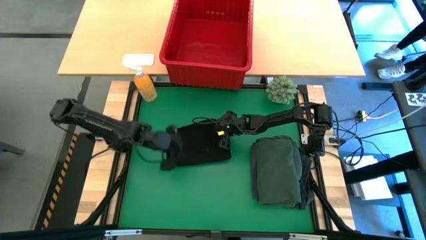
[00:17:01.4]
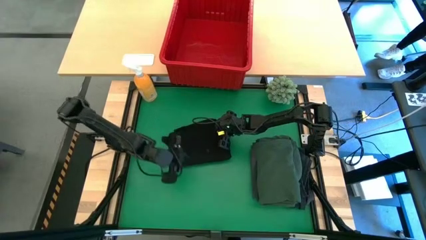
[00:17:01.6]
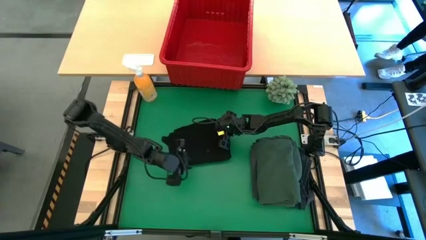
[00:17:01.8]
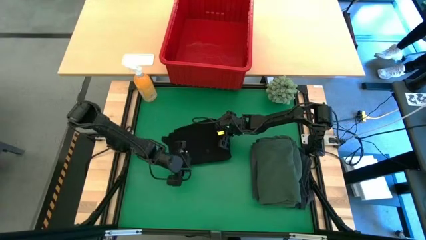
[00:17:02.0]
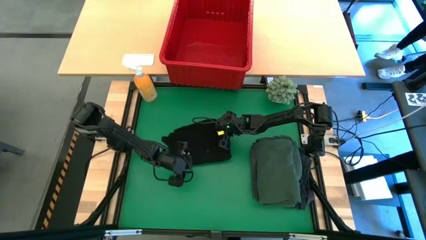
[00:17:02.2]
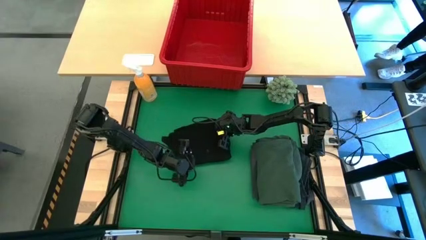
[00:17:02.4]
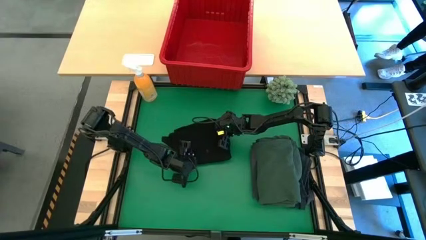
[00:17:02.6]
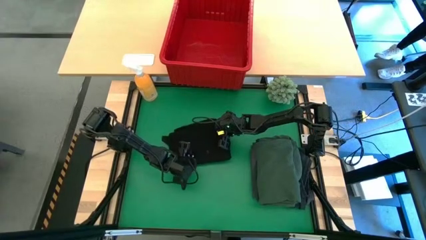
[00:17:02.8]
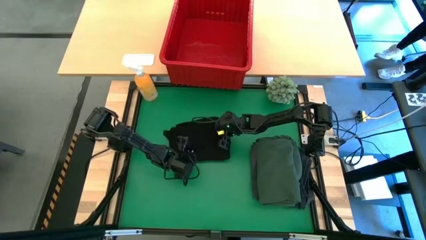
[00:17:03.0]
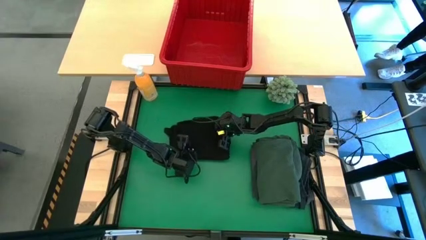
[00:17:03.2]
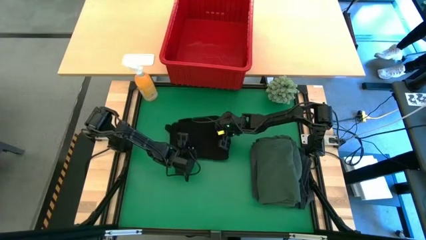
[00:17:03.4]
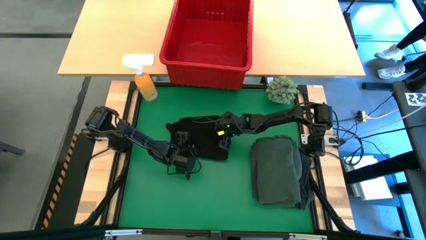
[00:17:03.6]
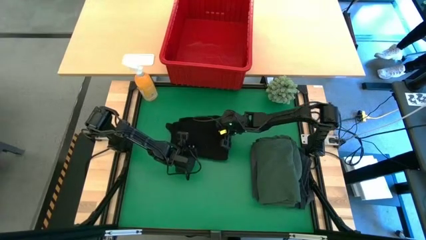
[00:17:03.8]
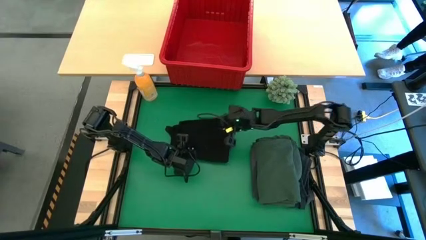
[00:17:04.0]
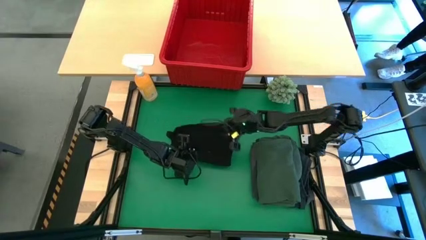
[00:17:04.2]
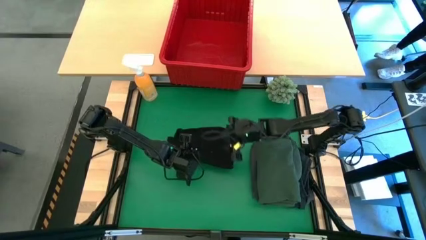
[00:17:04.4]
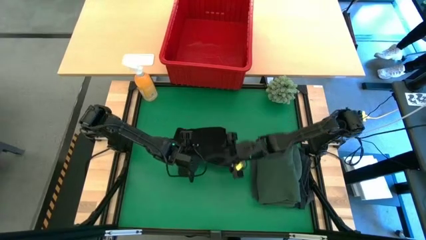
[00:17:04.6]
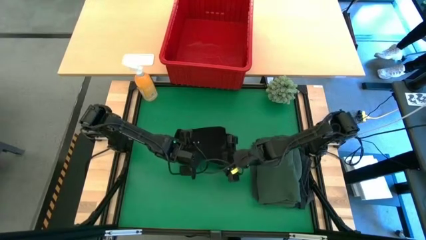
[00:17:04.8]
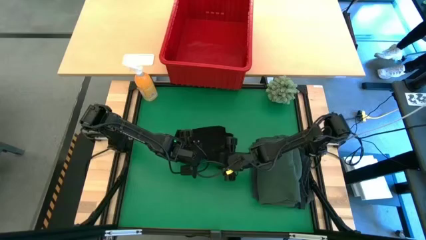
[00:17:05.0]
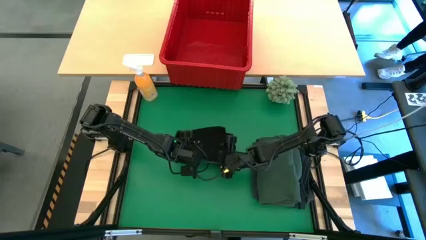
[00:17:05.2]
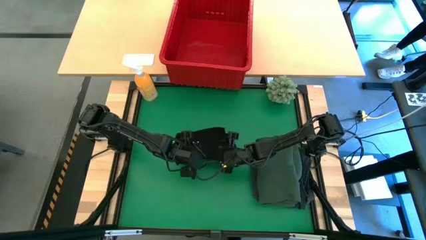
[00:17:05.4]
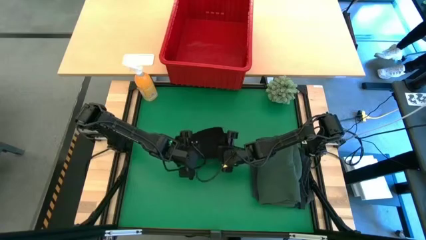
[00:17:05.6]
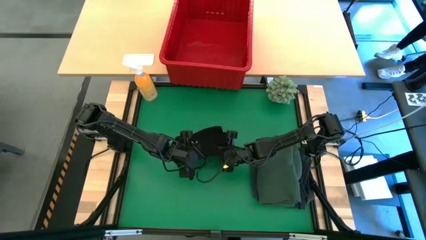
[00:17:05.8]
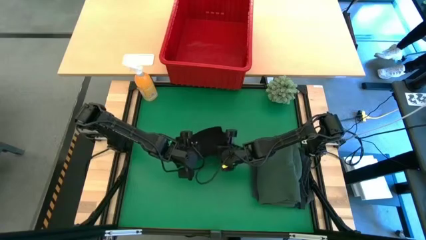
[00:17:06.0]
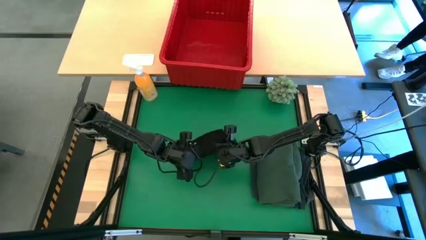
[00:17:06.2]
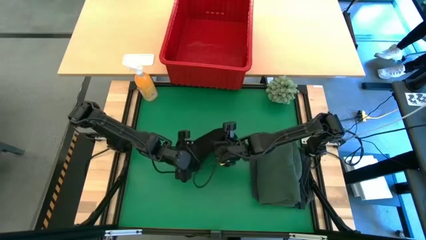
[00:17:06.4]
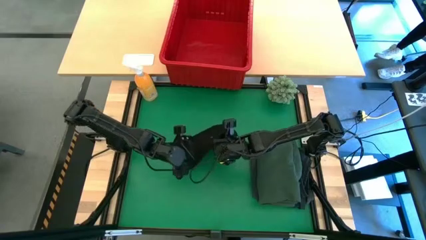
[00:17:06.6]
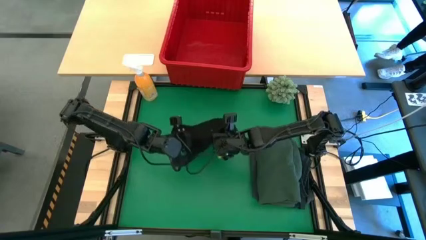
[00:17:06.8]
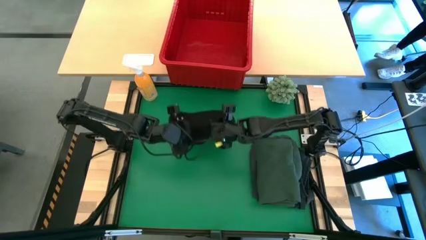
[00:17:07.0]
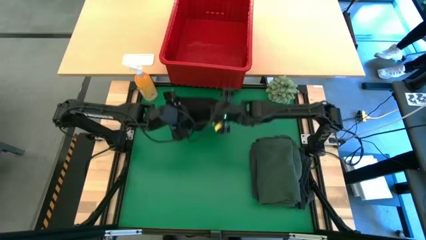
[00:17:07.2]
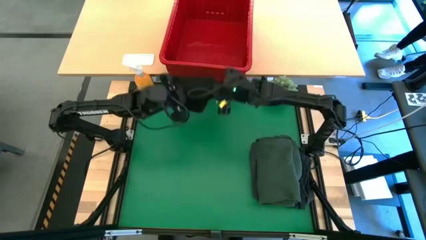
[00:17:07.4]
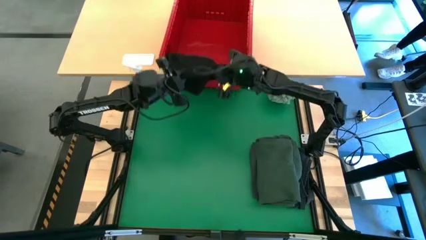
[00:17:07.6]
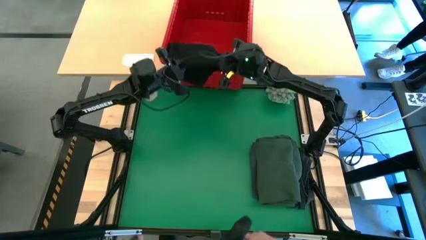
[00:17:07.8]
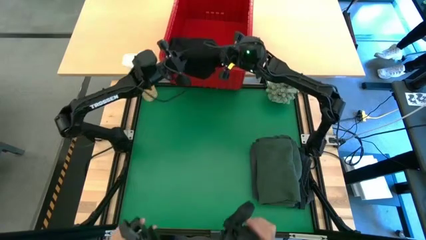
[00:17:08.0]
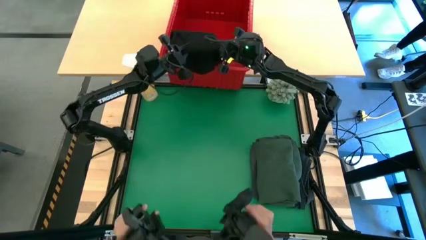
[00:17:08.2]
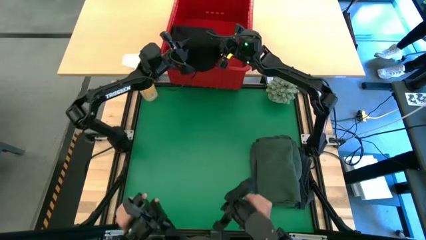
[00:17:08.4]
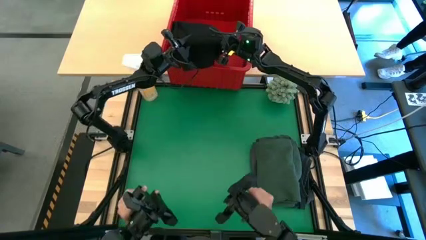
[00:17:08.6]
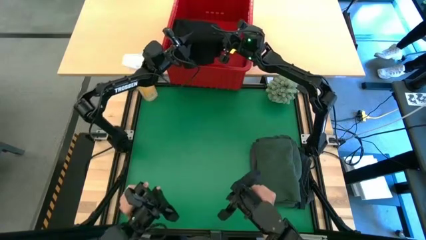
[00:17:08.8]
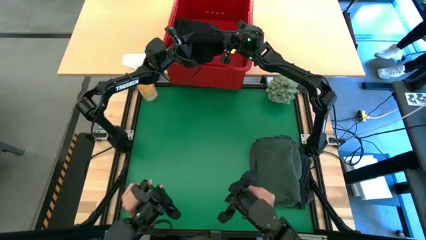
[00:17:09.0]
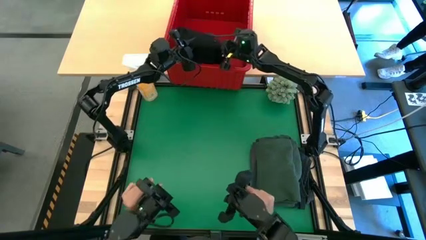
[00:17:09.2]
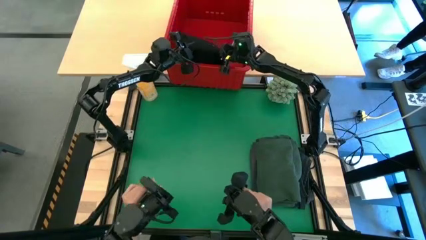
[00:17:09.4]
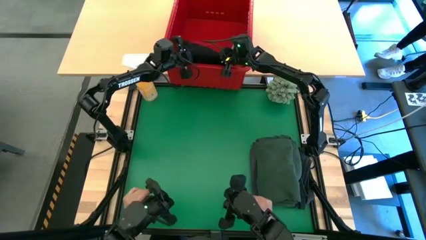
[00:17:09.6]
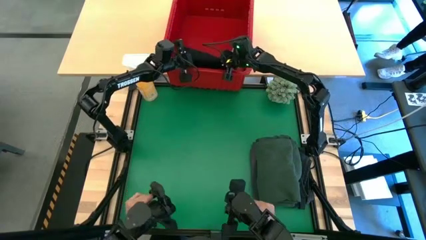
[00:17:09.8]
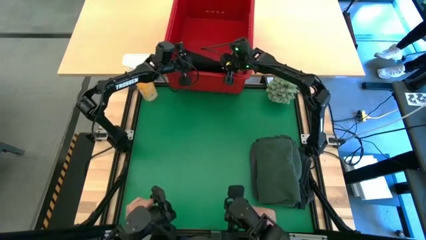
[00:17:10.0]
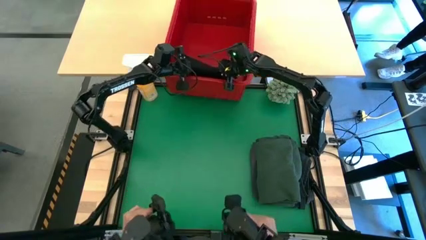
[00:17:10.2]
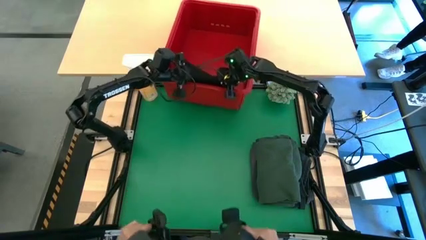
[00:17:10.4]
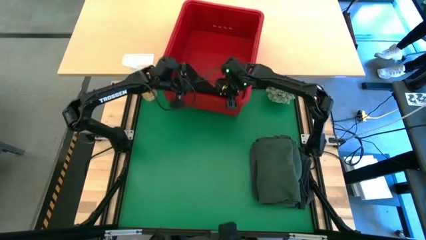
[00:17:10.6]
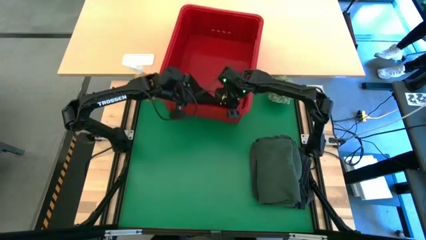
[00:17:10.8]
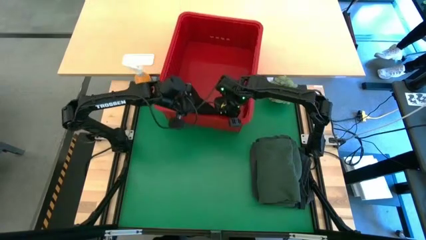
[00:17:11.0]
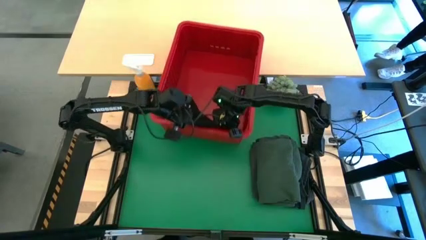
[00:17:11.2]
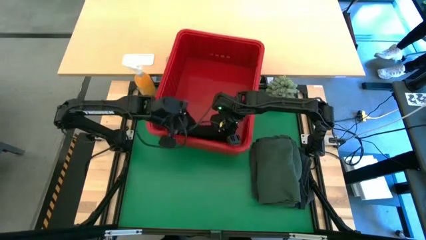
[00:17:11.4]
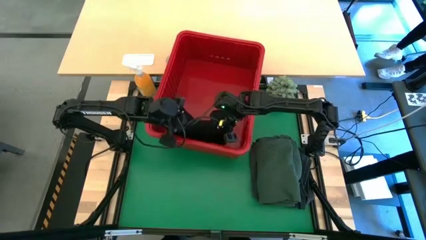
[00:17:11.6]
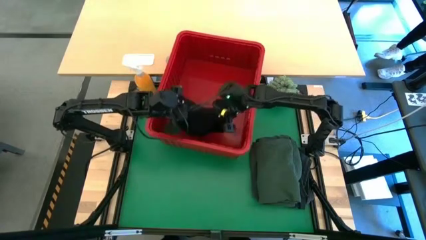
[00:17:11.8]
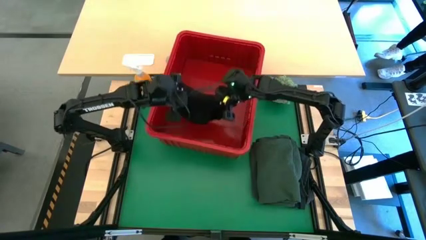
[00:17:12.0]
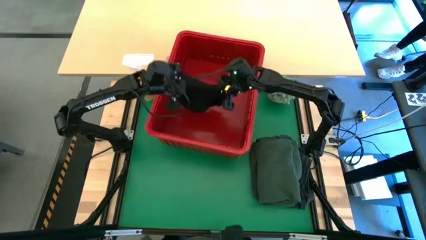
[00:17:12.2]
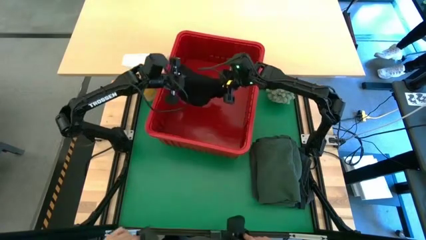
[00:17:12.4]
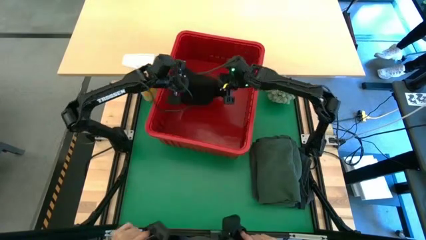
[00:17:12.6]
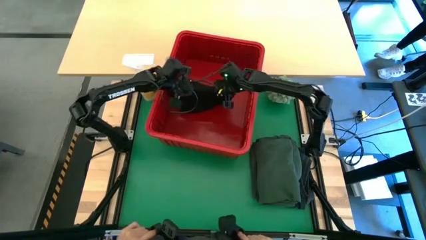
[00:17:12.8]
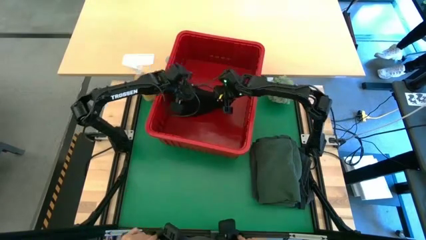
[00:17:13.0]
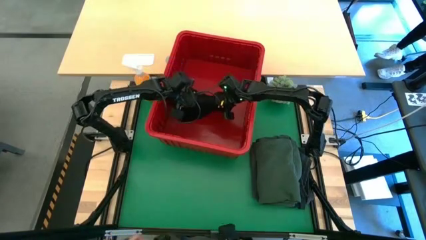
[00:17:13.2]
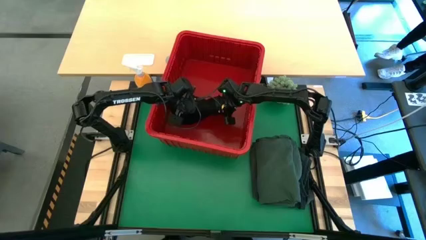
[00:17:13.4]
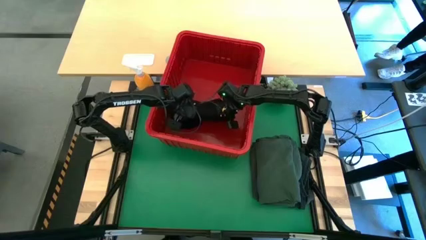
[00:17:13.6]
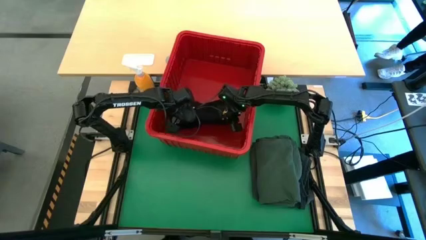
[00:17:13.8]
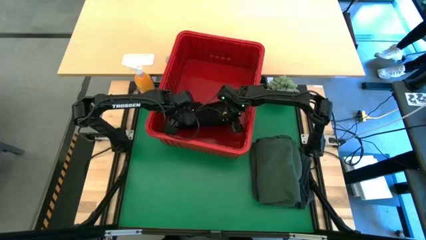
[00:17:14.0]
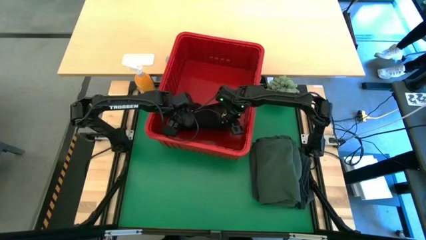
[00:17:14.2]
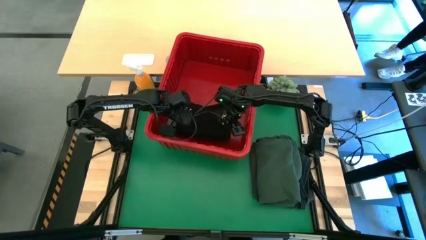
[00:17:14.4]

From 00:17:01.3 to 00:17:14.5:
Task: Fold Laundry from Bin
Put the black shirt into the red bin

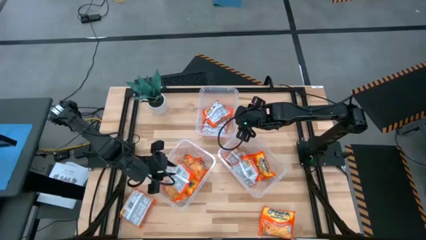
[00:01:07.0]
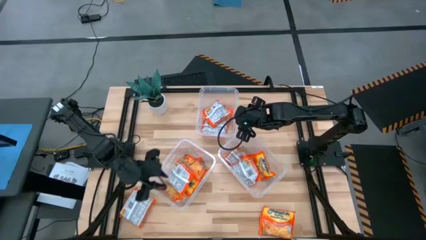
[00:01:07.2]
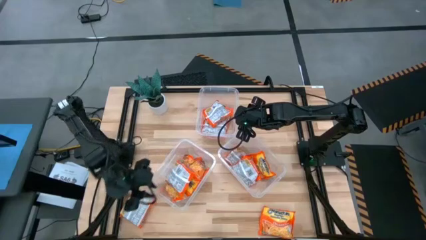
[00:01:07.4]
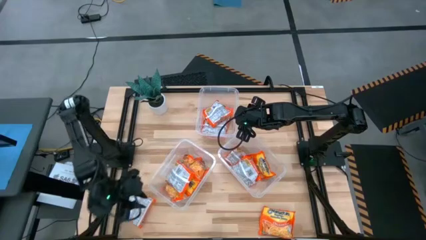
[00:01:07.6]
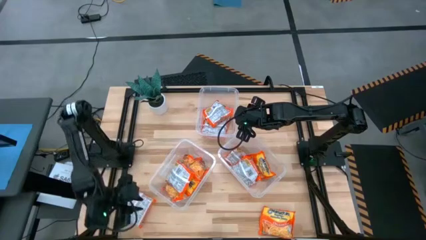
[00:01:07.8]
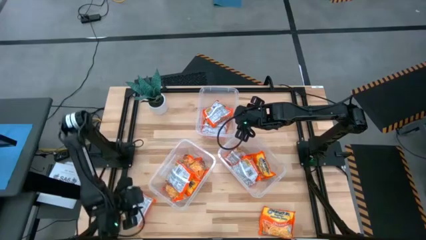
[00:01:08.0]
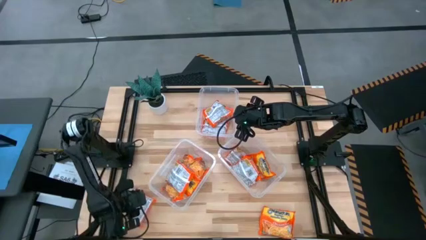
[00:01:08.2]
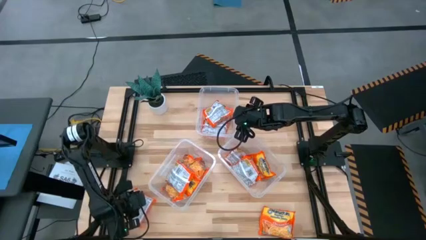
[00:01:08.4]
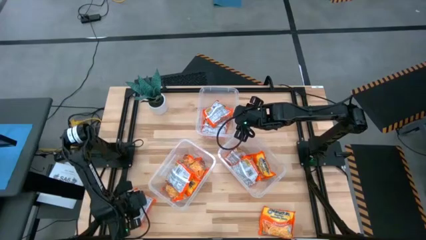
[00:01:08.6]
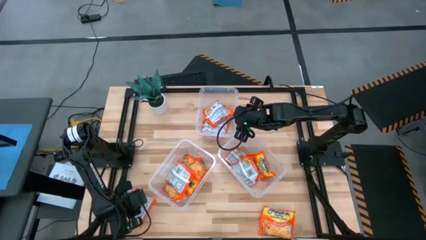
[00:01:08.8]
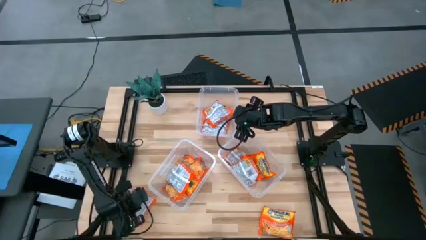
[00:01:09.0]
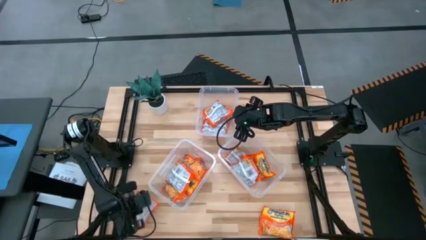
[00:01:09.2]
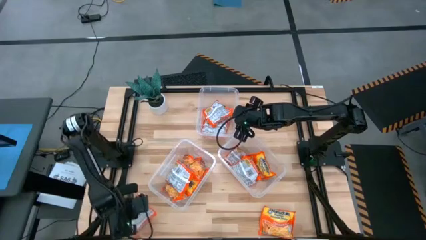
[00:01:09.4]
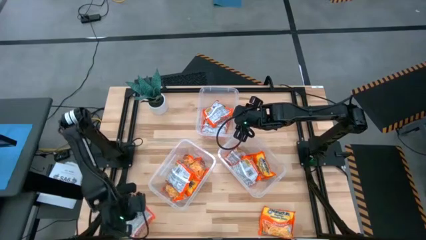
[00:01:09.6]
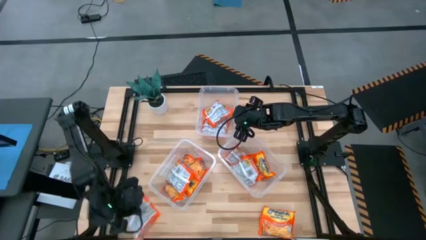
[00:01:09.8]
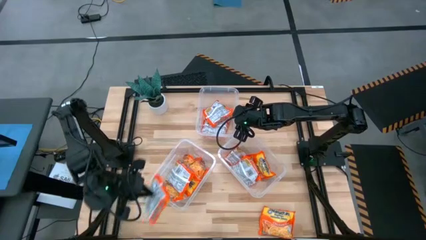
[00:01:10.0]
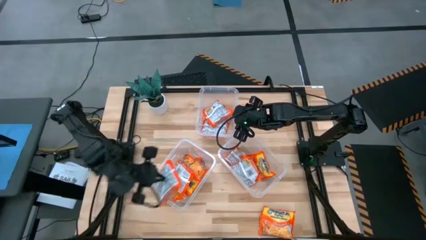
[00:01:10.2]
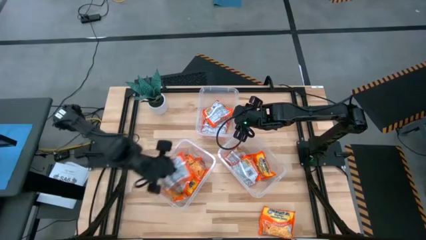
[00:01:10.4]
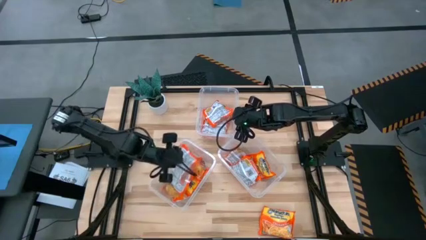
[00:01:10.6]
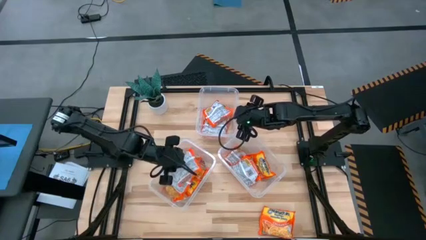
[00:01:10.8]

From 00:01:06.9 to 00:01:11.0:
Task: Sort Maruchan noodles
Put the noodle pack into the bottom left transparent bin
